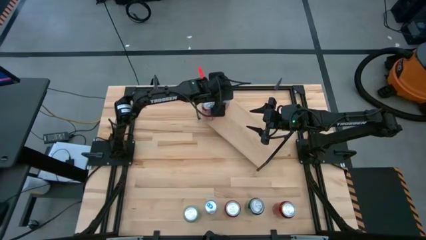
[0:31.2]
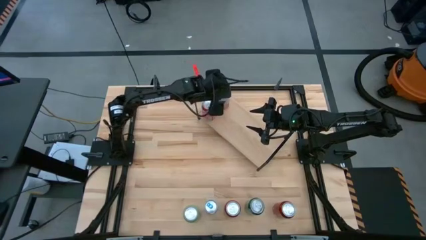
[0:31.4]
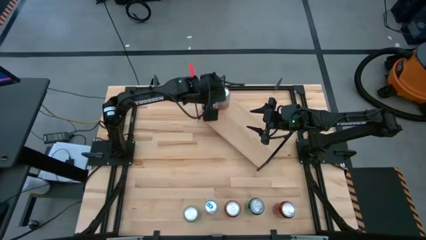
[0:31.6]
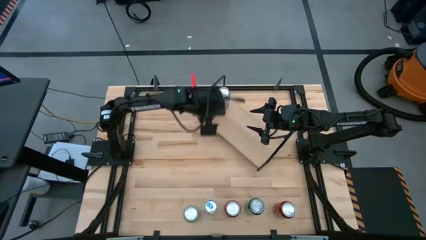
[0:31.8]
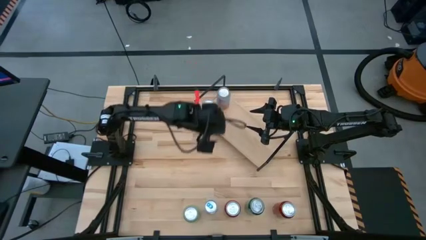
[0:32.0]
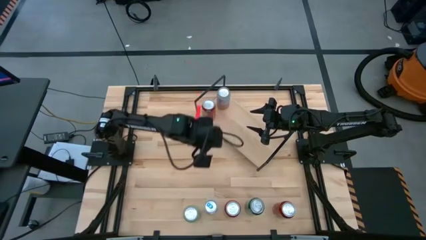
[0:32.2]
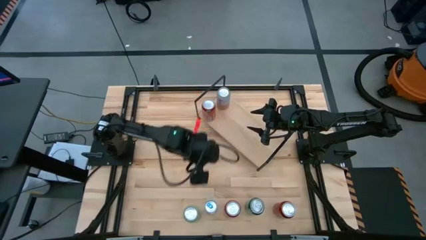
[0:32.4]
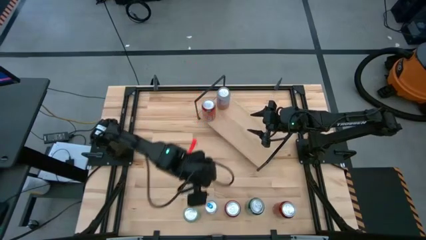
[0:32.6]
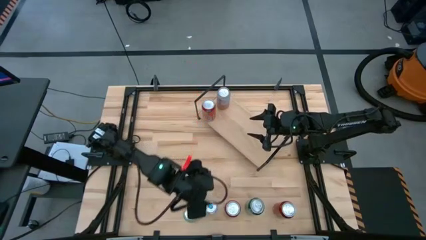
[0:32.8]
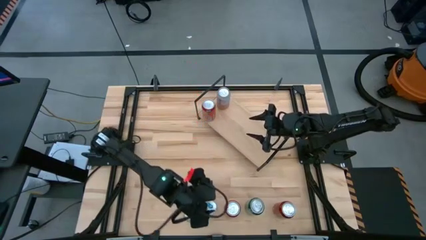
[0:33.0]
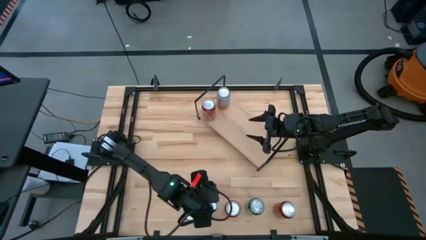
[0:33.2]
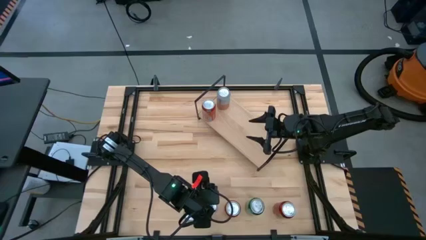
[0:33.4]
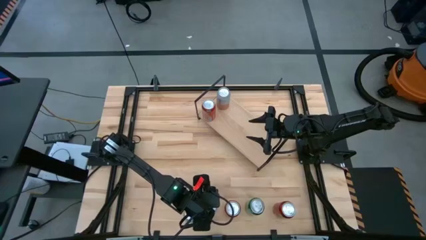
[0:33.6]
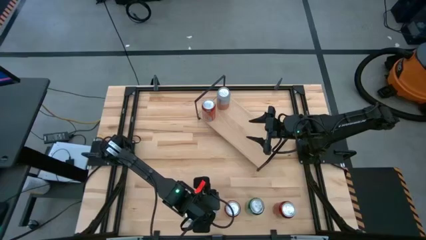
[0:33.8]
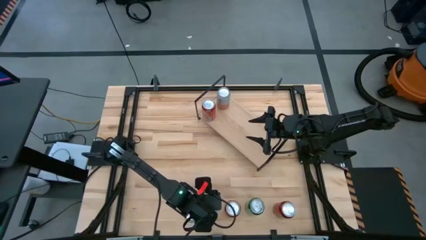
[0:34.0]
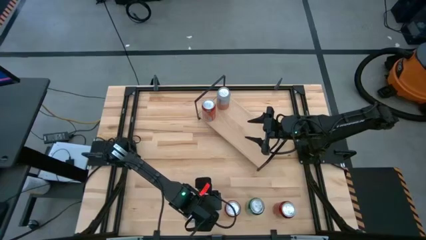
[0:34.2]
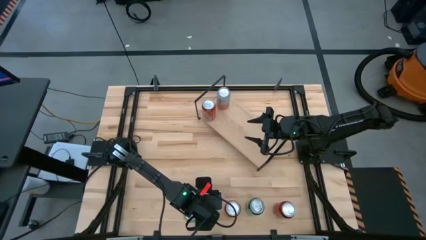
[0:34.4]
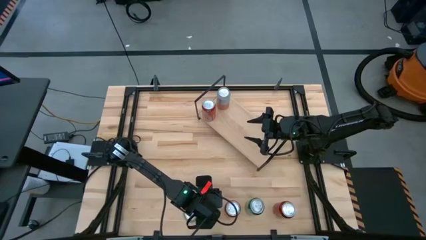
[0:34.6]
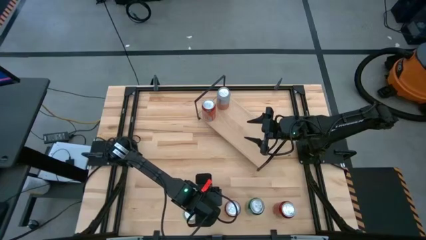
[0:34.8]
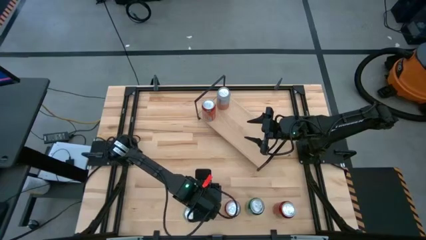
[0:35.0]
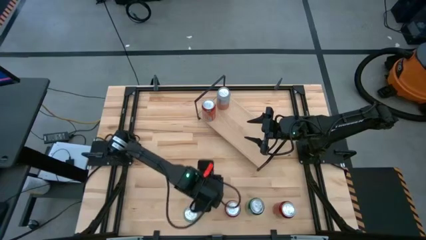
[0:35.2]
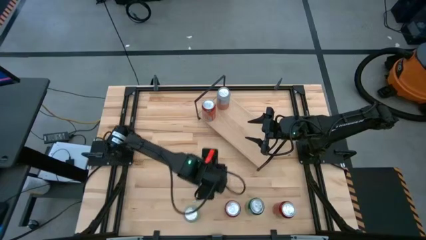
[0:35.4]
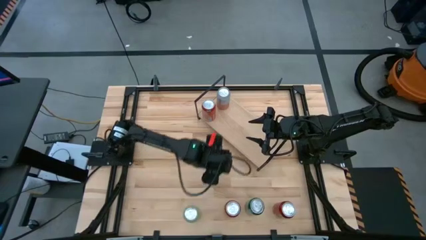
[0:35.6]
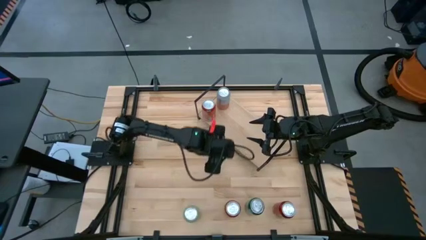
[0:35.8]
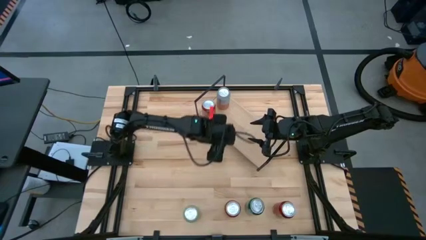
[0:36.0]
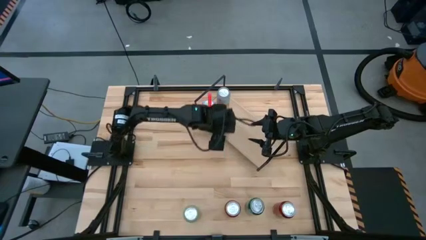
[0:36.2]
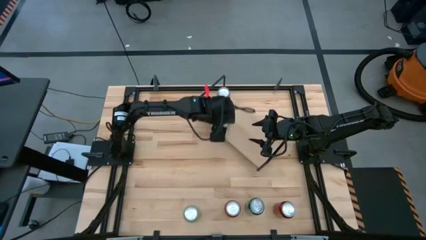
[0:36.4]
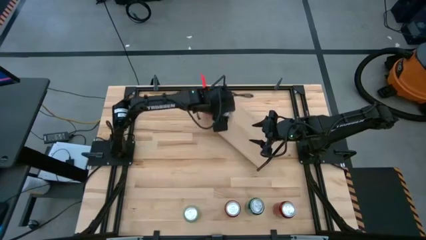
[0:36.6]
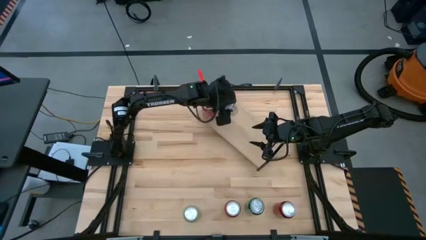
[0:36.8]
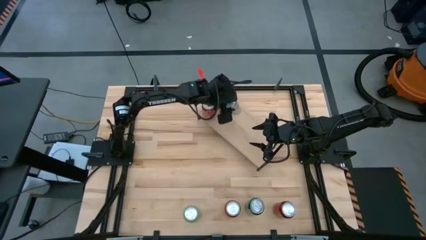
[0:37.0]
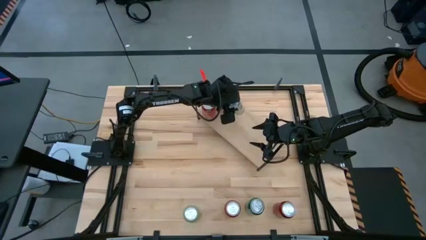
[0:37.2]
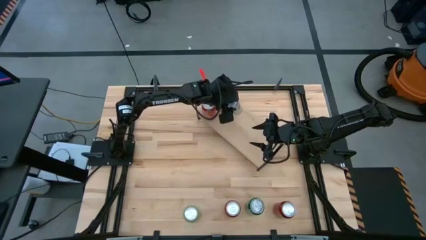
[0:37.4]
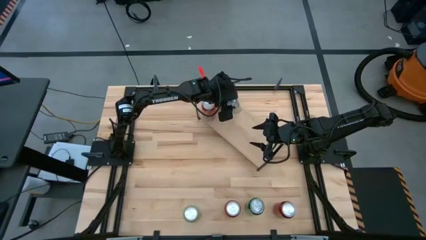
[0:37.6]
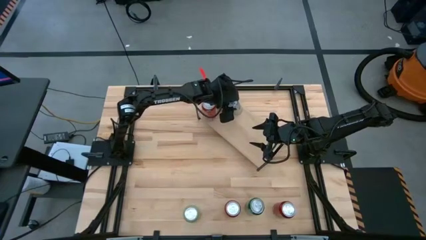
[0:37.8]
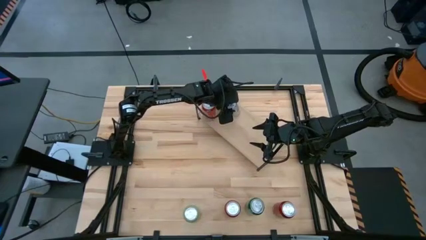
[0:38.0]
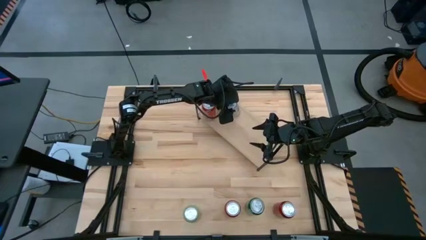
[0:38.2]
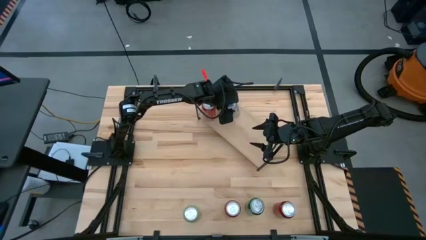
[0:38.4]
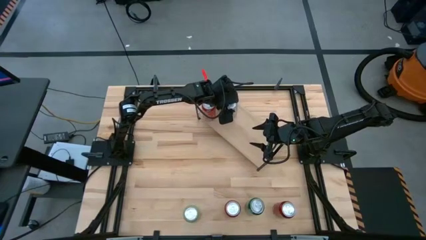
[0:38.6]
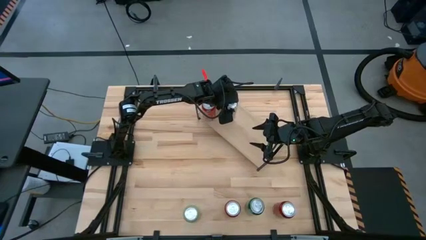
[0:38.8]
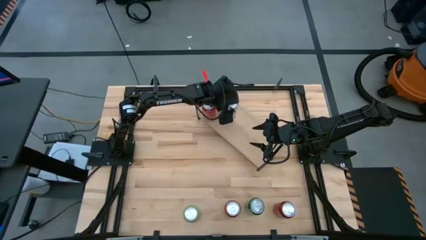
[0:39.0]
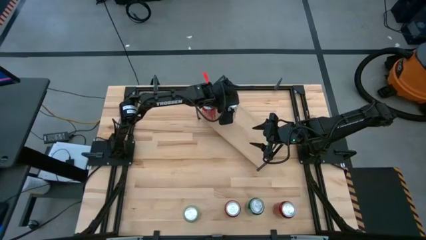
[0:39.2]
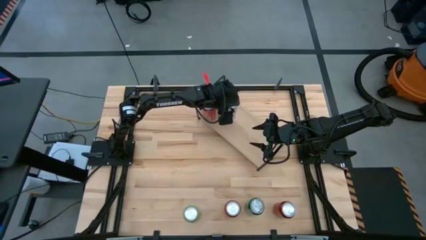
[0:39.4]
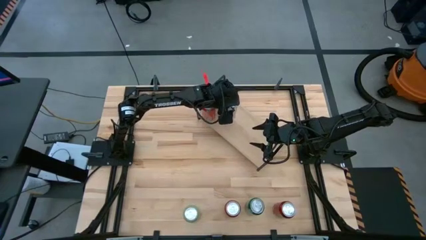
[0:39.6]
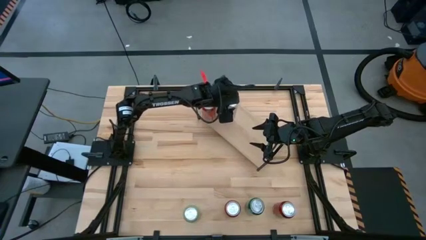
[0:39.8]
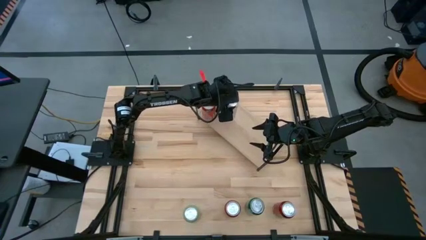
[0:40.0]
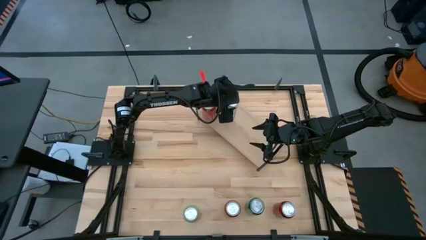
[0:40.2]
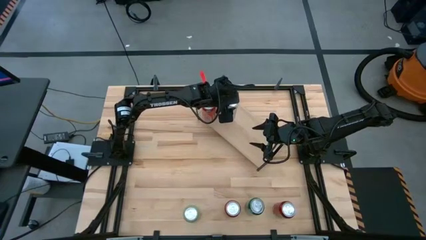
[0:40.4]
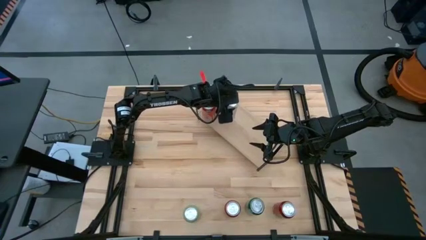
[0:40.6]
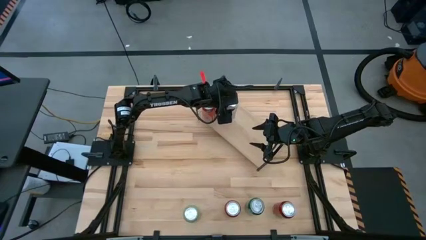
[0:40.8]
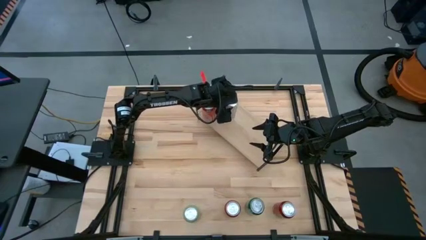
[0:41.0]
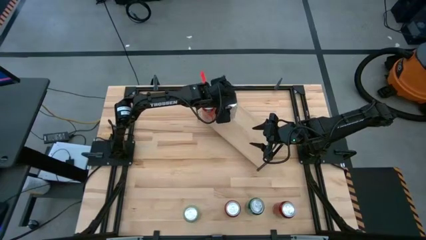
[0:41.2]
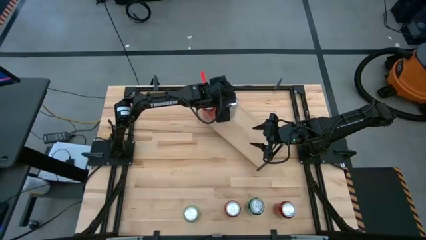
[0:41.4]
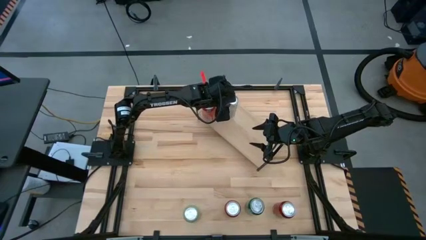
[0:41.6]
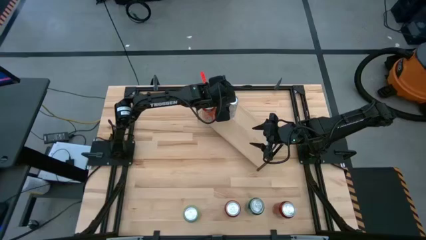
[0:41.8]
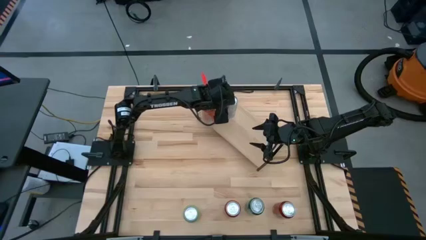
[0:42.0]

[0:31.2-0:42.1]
Task: Place canned beverage on shelf
Put the blue soda can on the shelf
